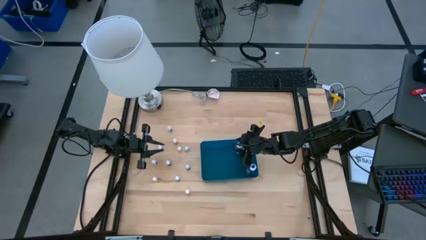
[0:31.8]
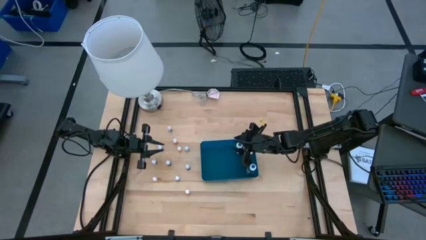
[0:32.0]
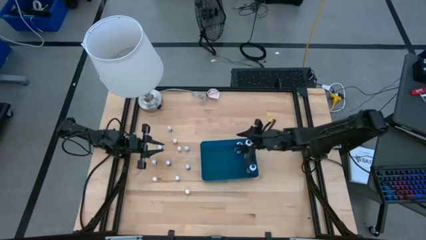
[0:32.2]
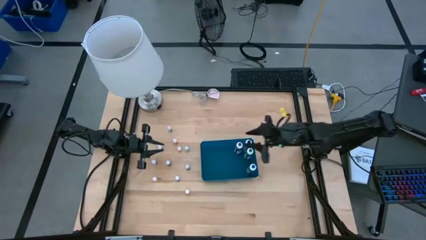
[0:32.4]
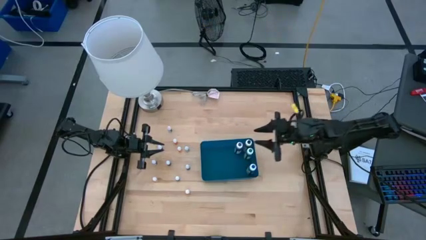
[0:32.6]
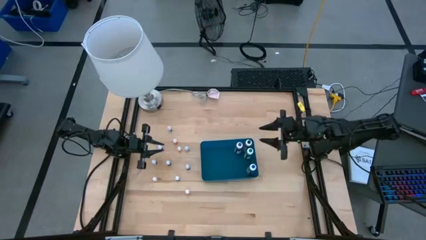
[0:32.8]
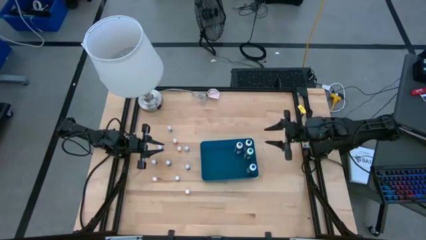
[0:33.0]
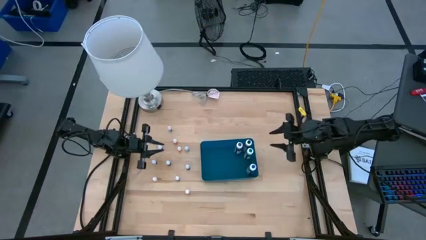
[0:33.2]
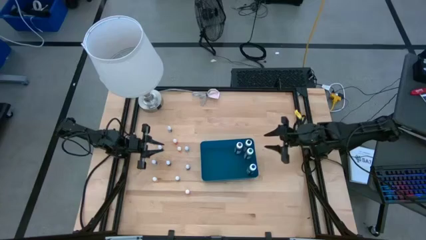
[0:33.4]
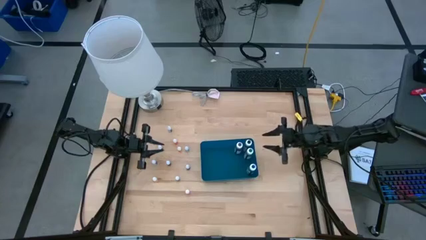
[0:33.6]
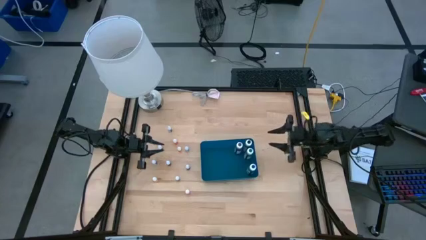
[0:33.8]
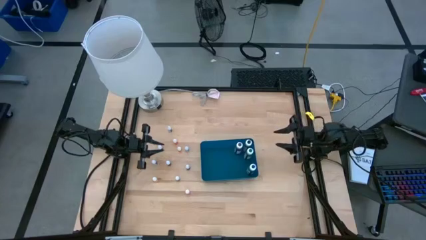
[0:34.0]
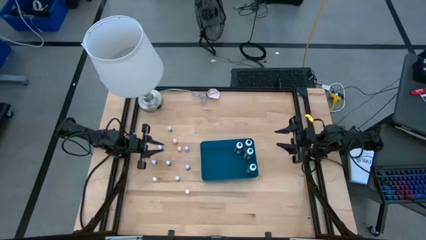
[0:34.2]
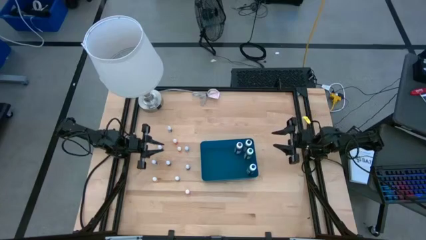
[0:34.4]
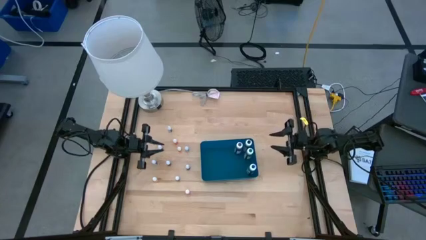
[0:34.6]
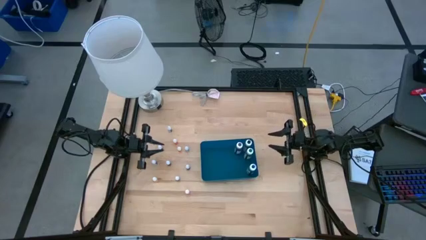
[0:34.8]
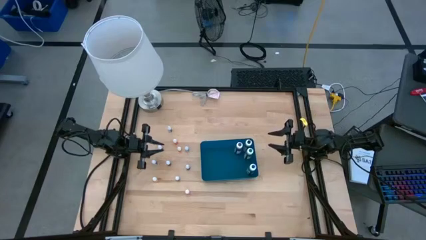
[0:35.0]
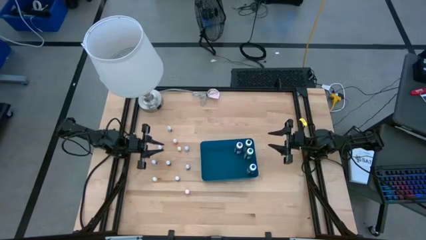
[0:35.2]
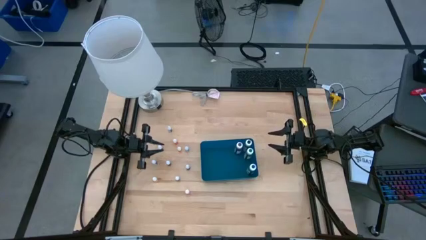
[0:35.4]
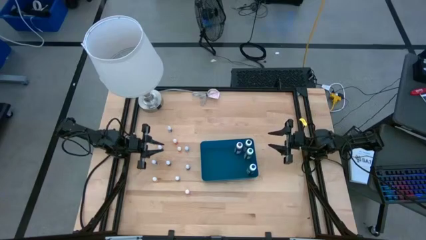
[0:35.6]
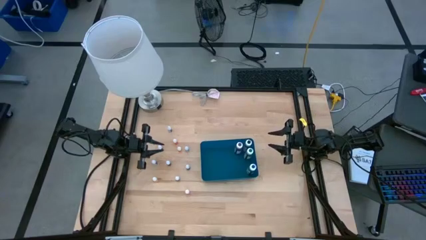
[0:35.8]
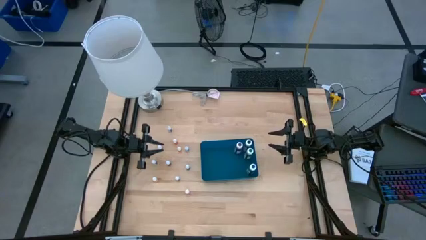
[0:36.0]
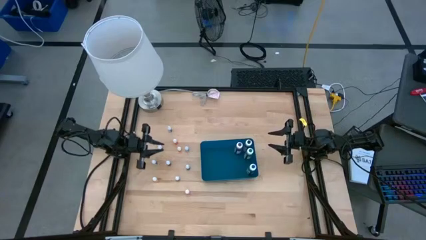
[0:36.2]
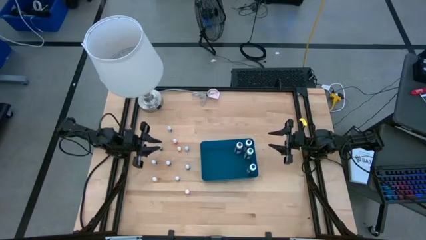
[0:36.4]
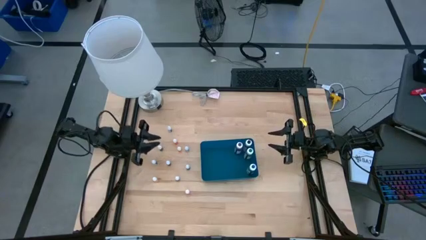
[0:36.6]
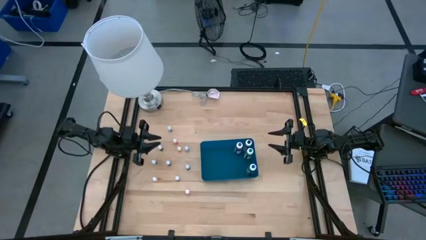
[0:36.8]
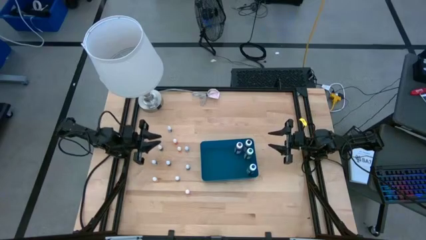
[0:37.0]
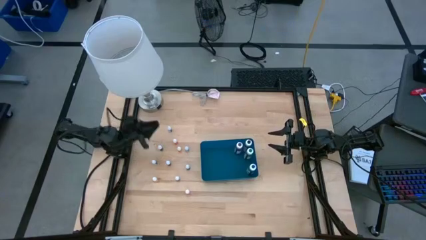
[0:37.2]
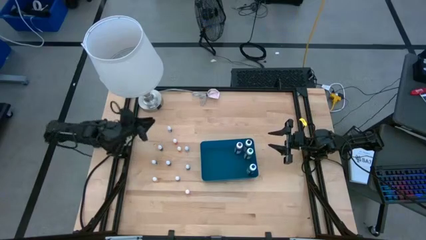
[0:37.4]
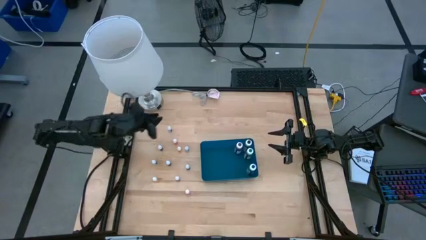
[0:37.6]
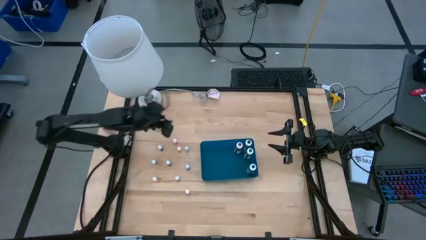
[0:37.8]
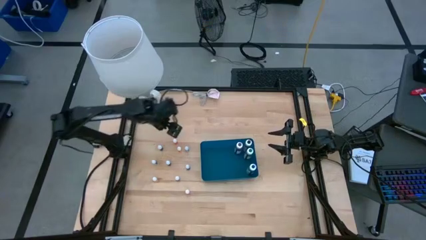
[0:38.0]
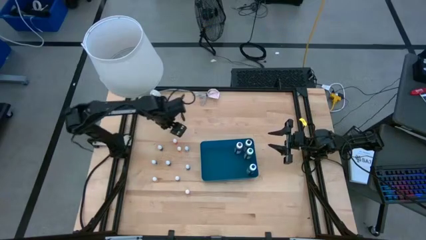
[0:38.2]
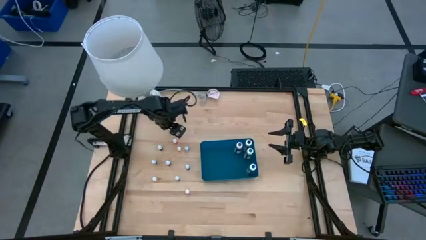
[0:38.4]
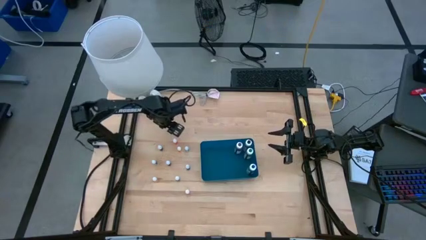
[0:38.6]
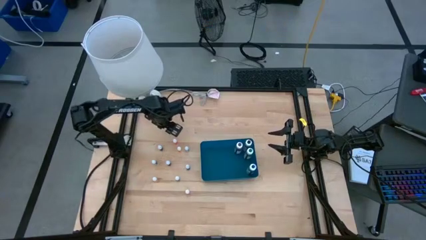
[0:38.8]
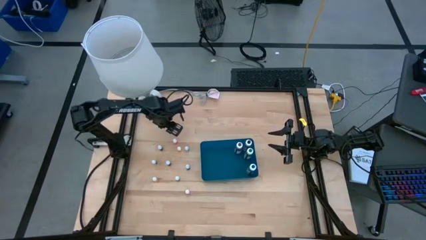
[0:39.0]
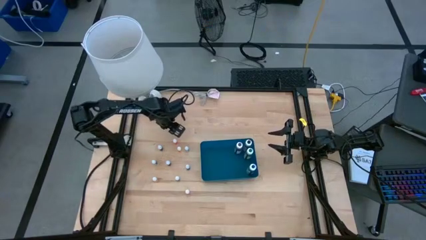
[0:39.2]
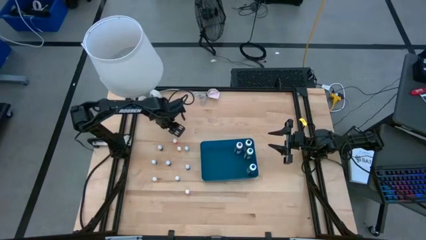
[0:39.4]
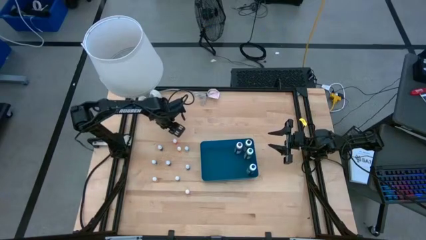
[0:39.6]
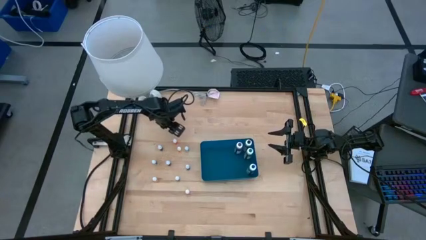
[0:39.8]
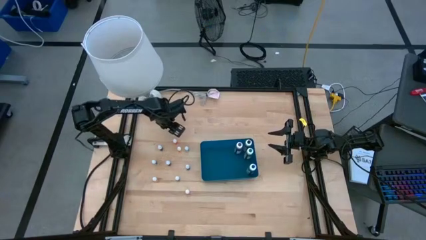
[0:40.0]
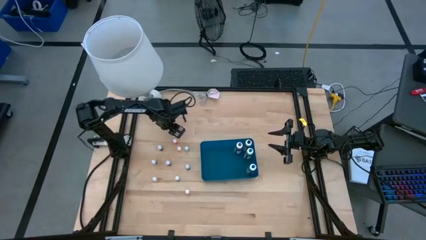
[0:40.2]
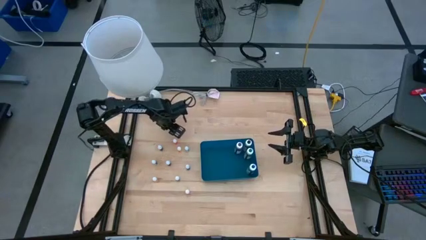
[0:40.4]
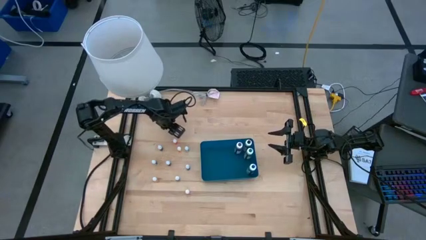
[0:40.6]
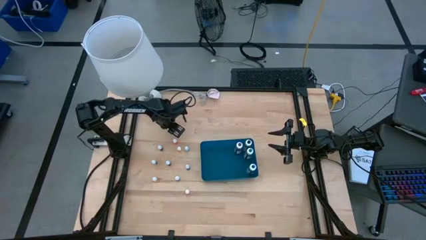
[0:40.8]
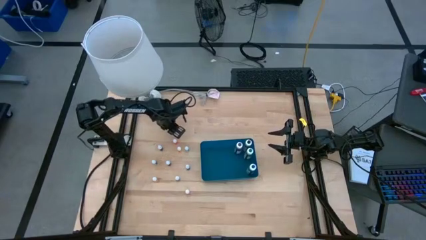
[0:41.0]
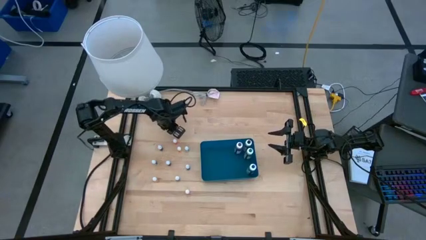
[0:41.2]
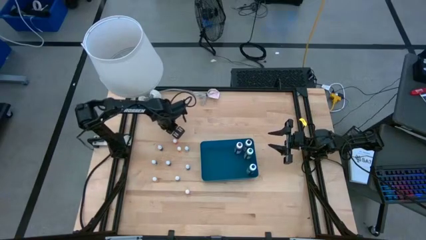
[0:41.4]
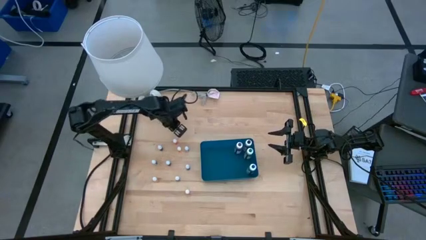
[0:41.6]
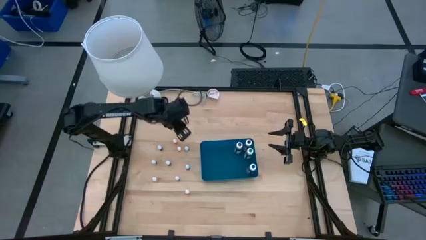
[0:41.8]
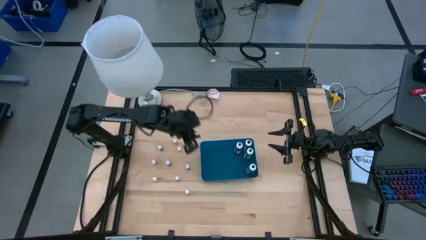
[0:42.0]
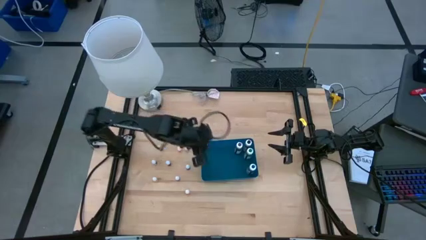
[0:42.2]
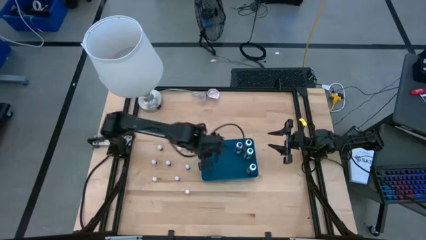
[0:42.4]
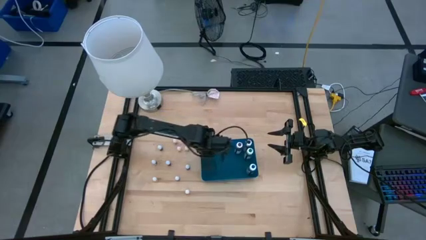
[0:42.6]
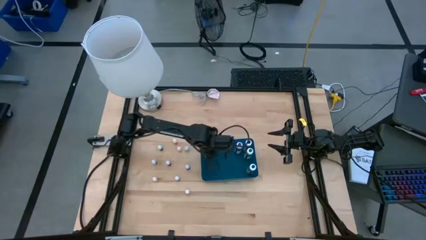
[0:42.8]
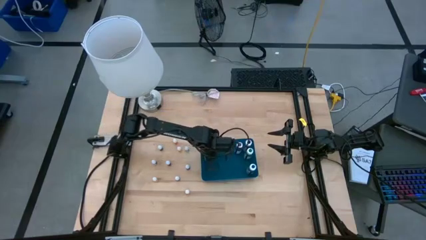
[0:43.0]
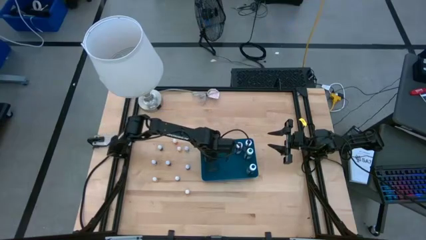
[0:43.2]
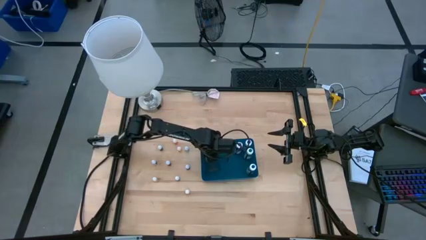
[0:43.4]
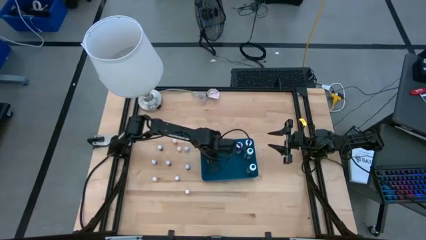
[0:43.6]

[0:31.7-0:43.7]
Task: Pick & Place food coloring
Put the small blue food coloring bottle into the blue bin

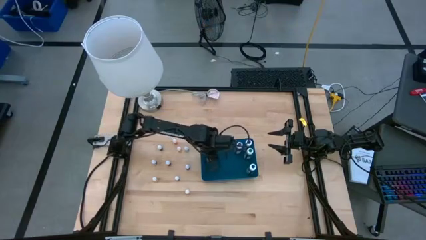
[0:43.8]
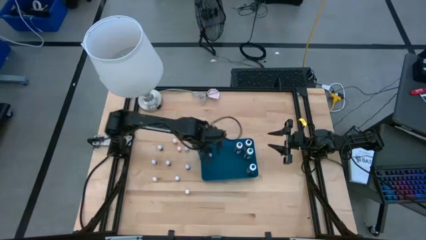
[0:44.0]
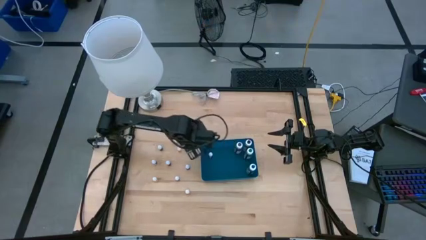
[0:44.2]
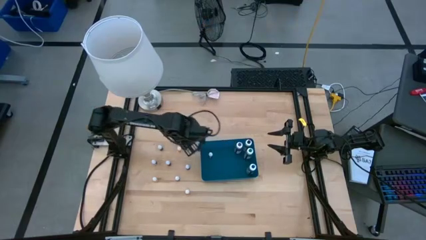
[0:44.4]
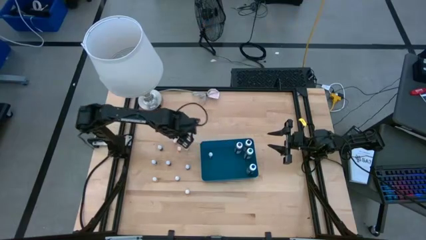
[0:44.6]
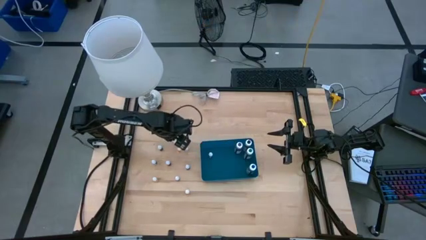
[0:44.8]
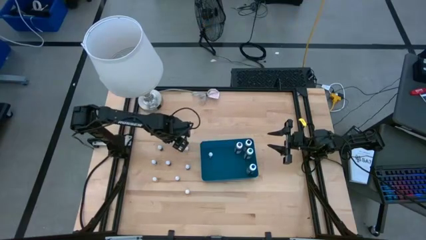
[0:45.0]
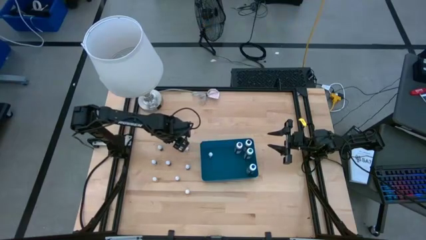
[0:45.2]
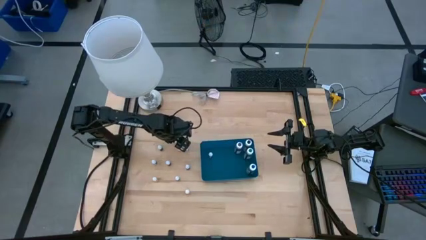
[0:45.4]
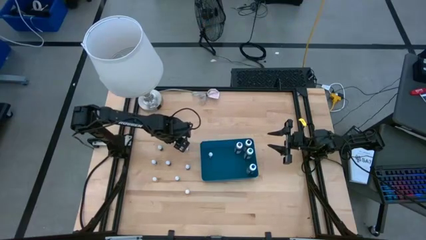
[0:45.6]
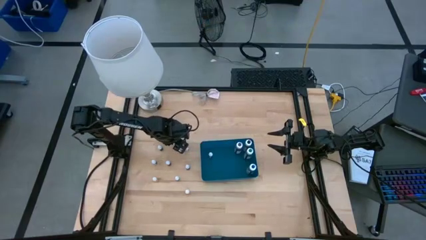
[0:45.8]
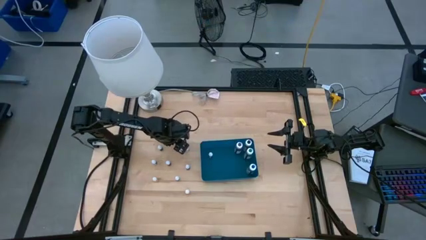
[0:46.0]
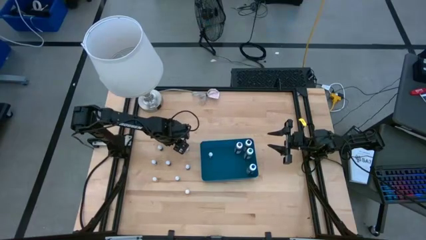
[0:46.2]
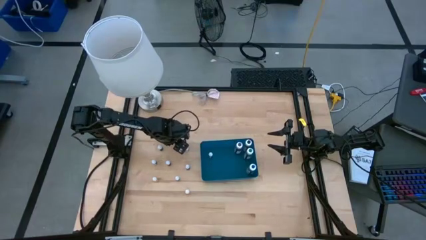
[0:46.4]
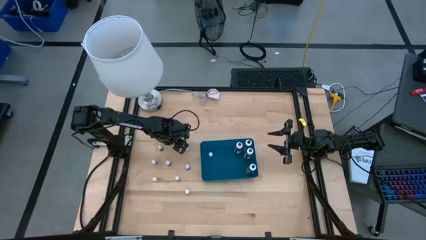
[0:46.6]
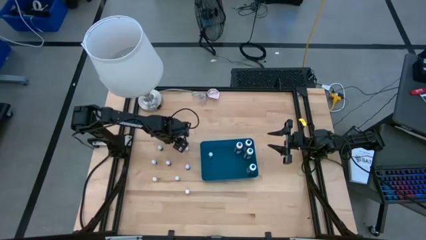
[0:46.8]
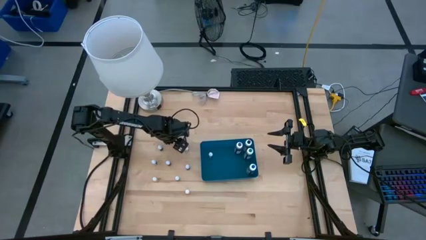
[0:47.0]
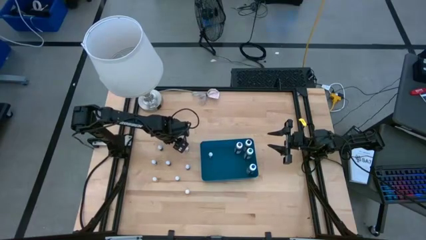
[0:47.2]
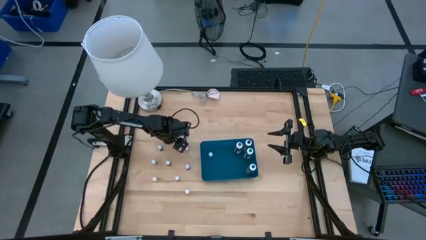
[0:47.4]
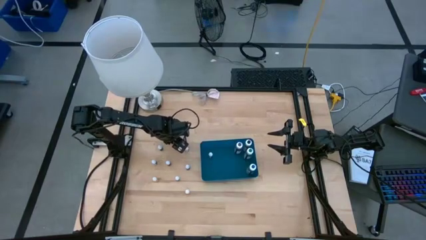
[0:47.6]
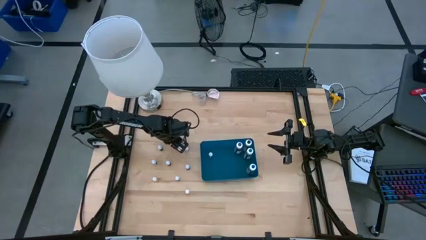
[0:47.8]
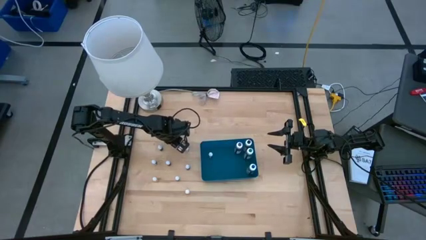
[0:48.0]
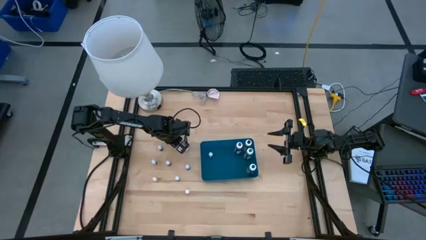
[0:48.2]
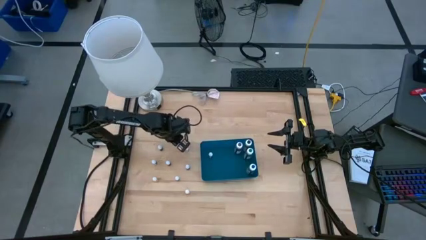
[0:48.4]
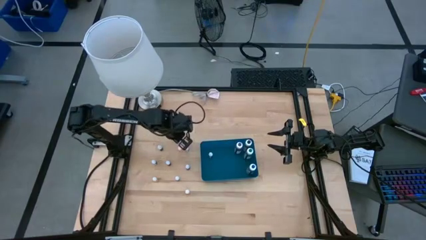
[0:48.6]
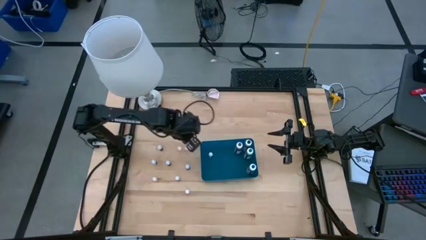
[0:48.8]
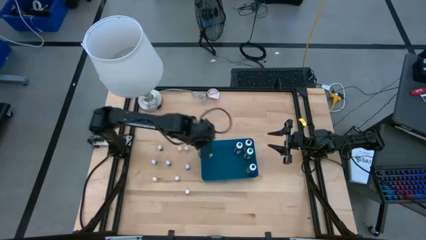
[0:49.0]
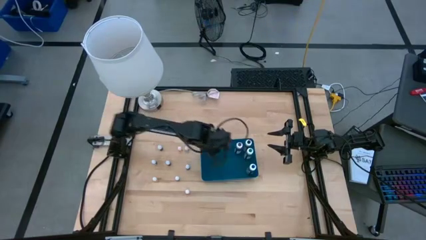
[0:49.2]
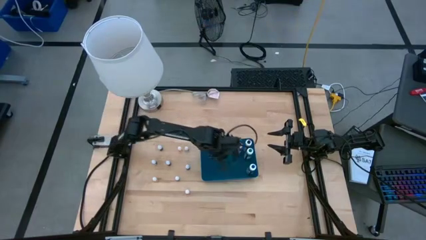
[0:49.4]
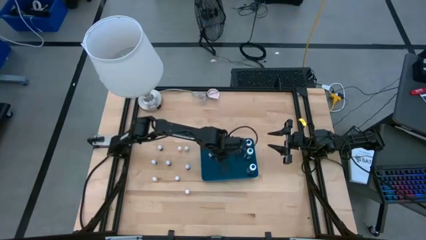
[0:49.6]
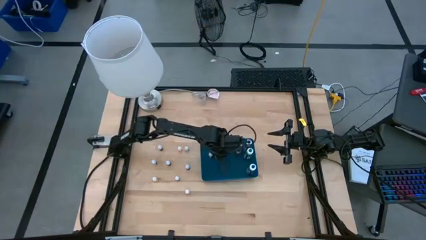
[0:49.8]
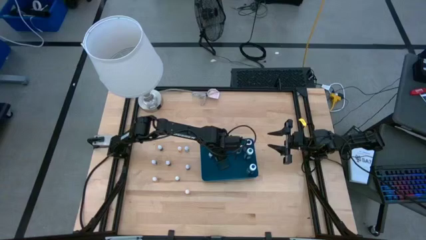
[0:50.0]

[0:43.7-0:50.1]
Put the small orange food coloring bottle into the blue bin
